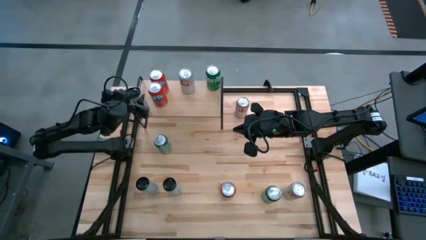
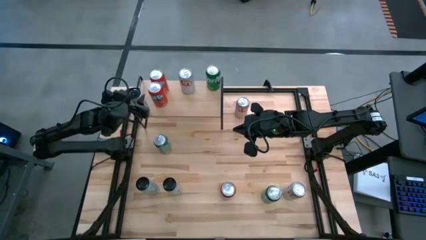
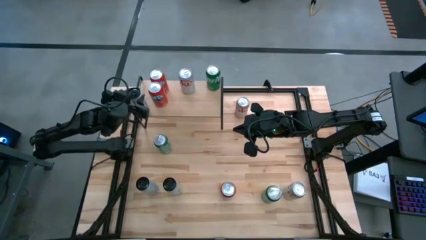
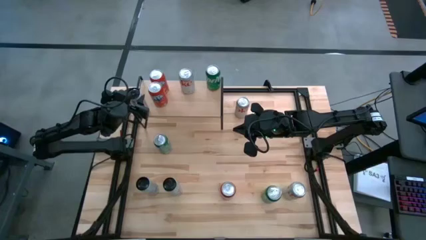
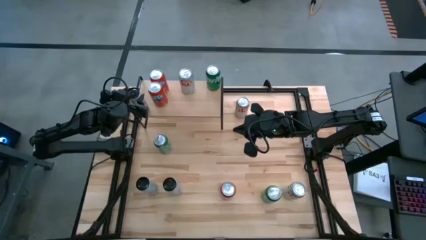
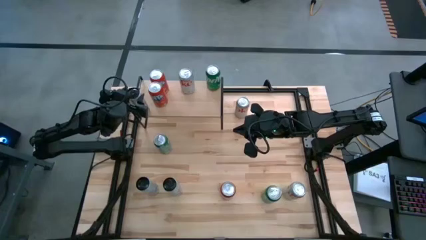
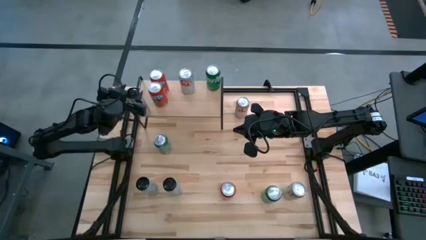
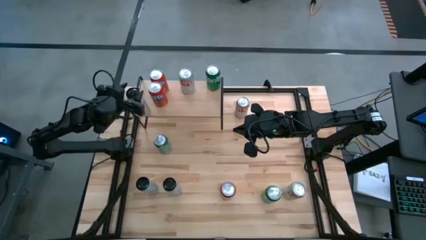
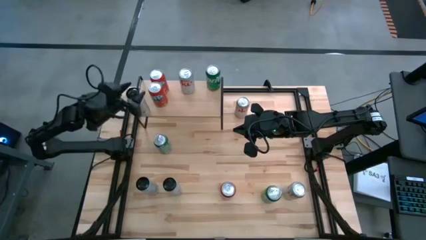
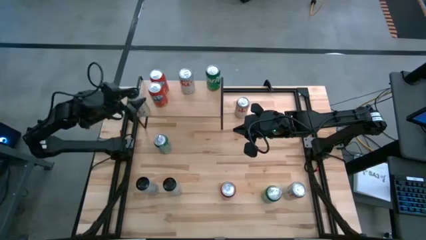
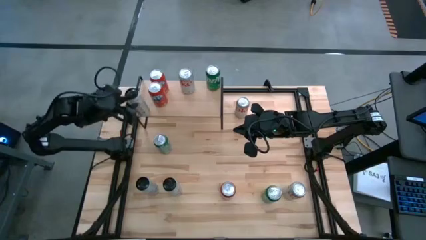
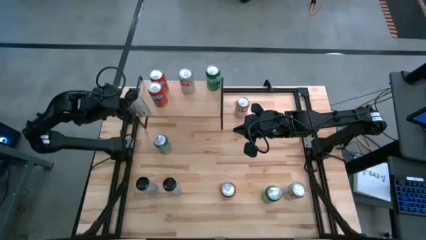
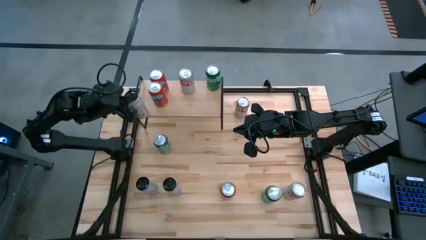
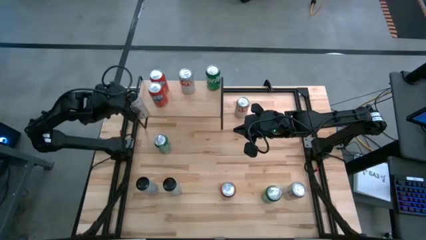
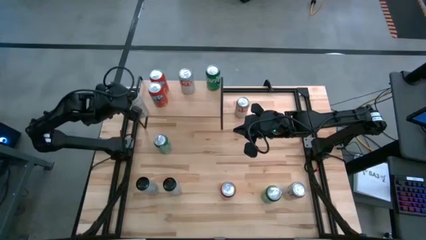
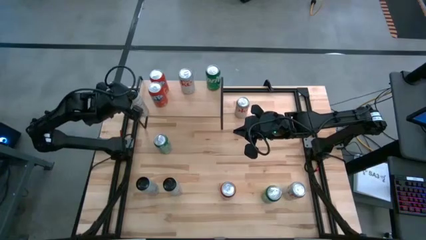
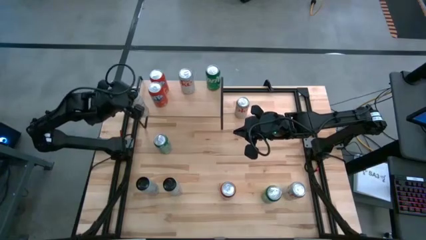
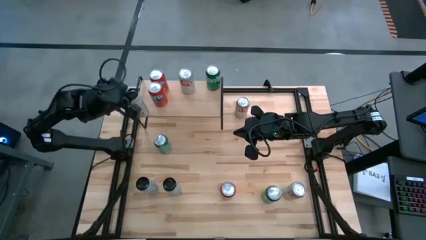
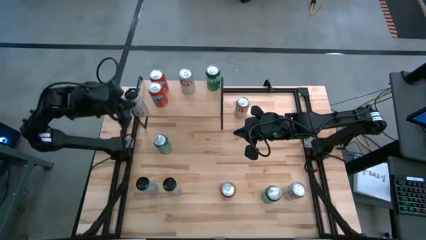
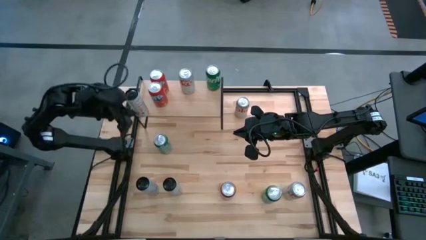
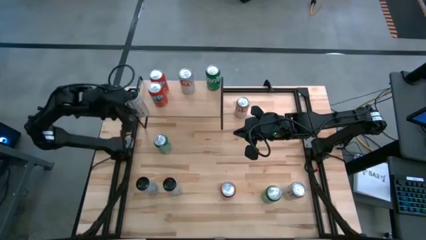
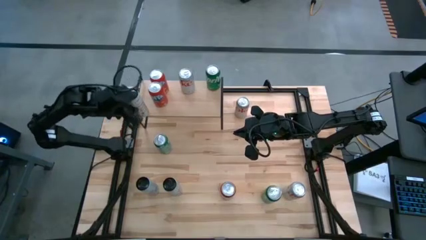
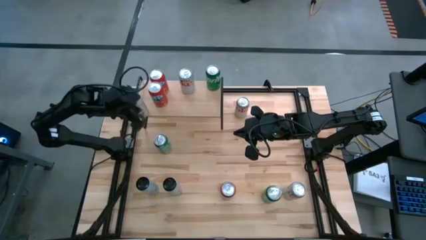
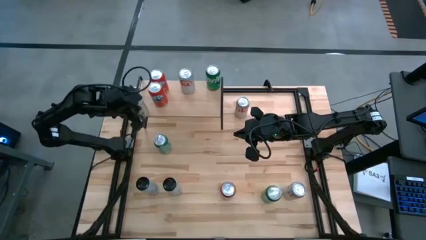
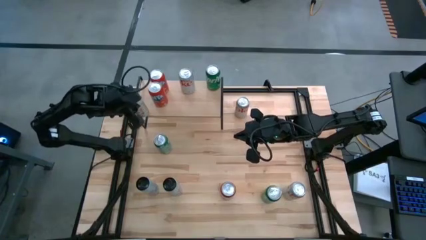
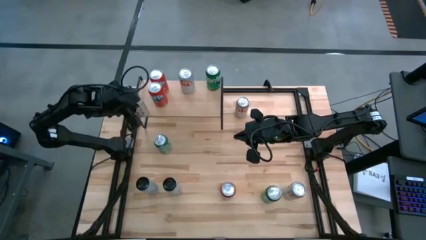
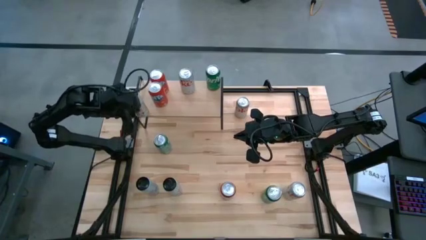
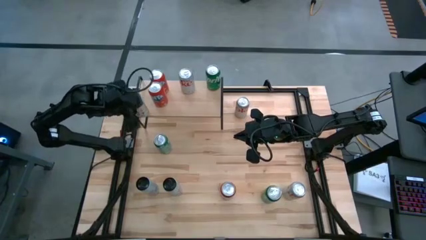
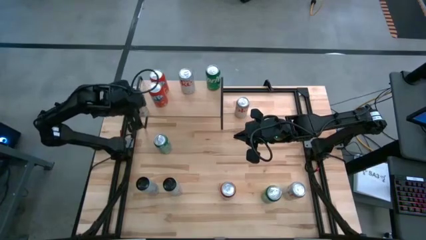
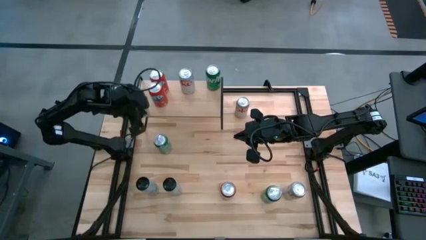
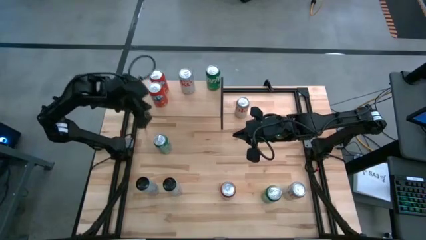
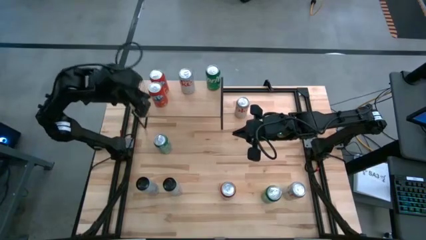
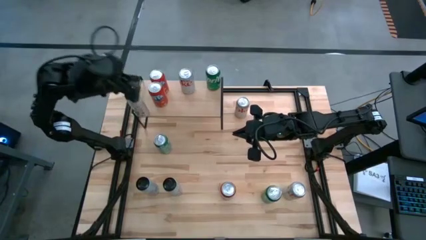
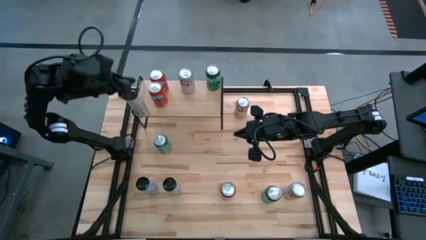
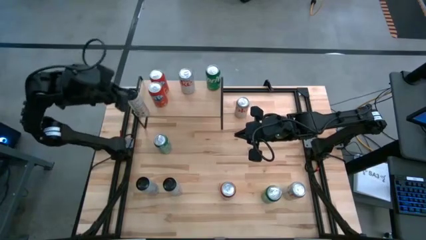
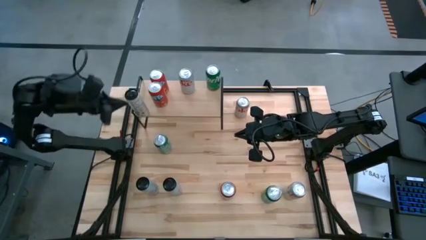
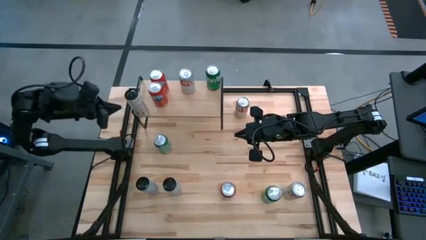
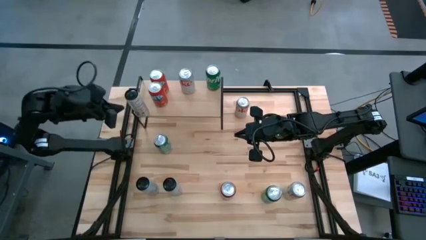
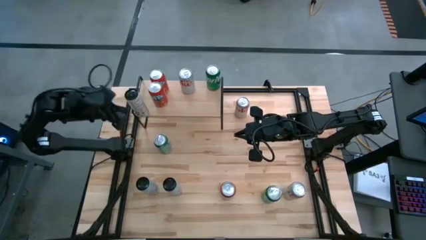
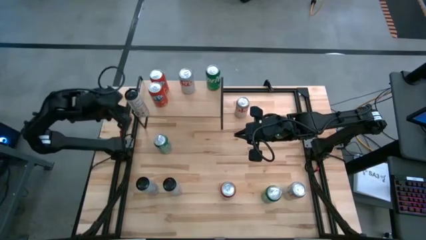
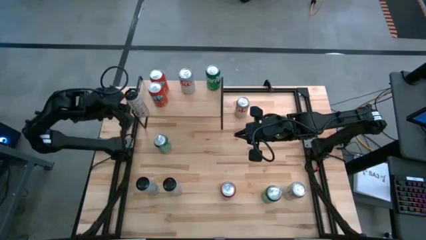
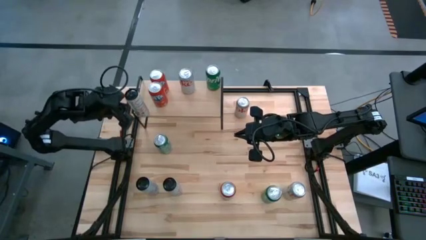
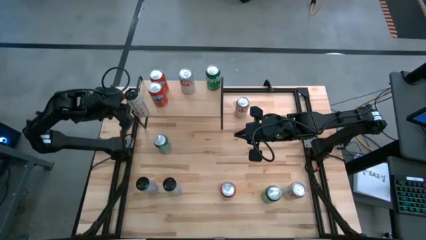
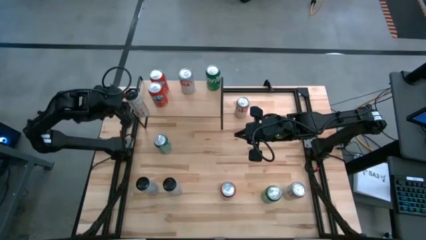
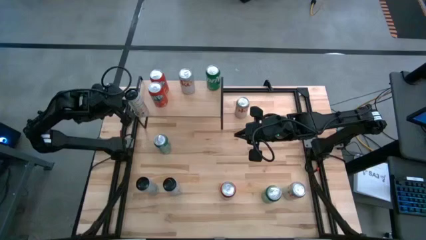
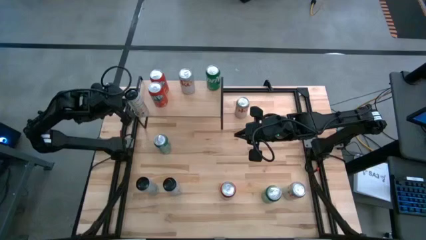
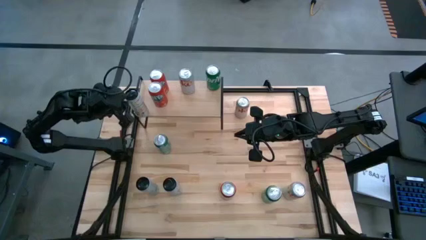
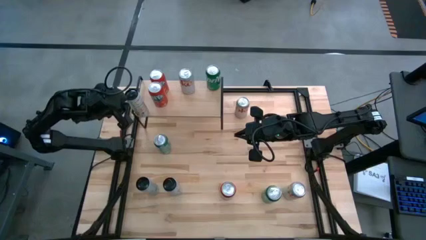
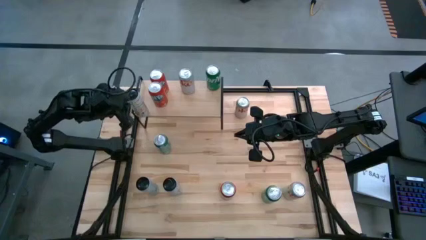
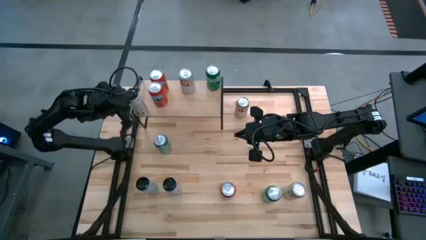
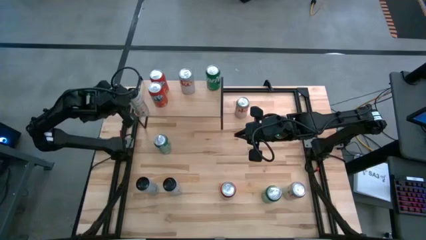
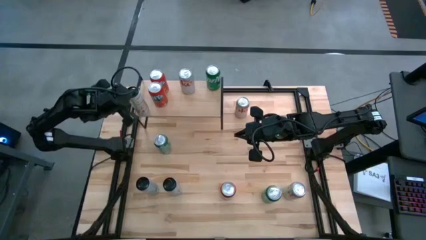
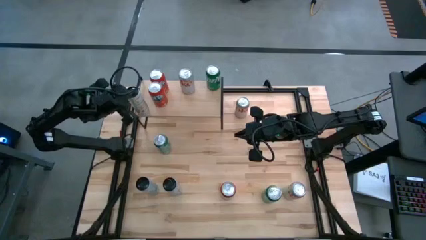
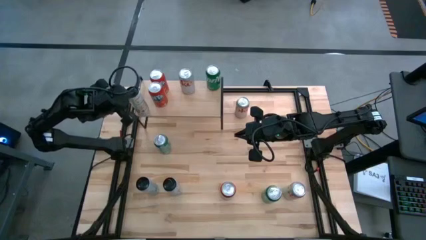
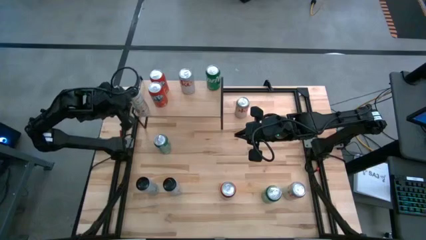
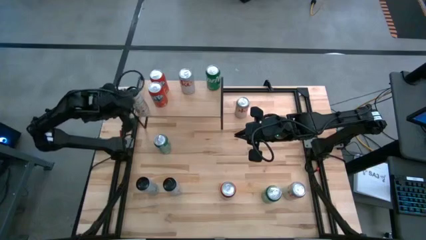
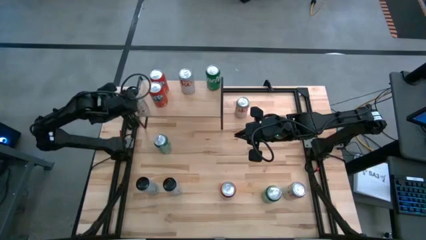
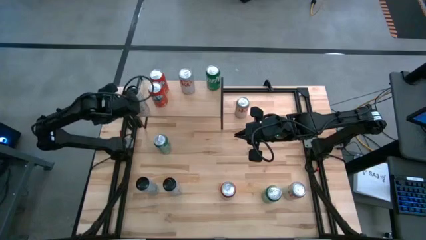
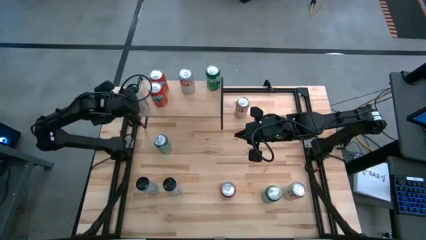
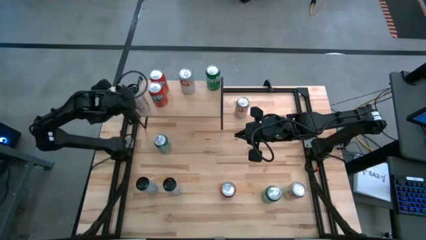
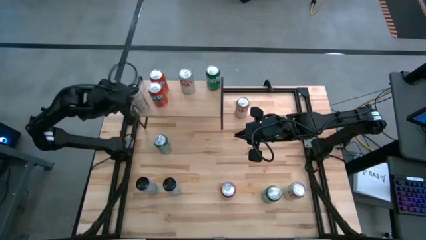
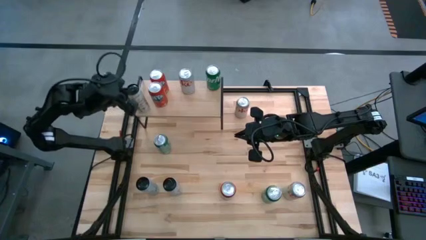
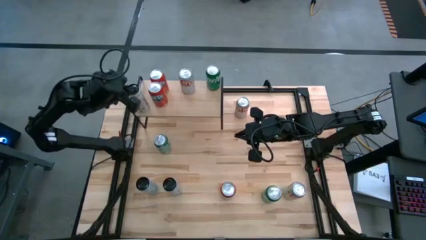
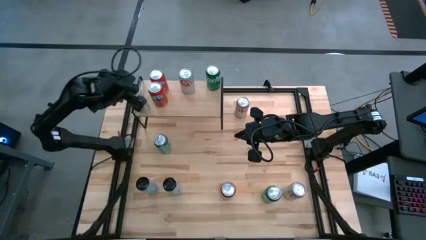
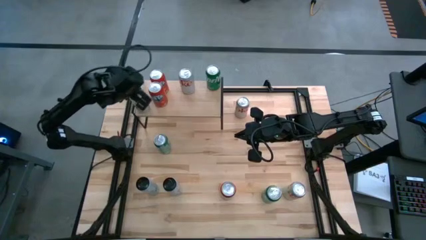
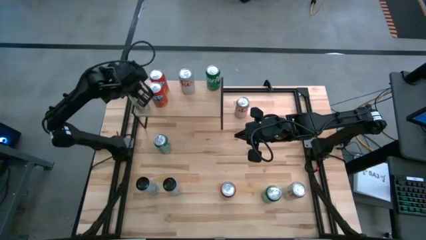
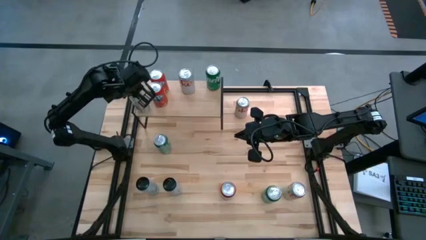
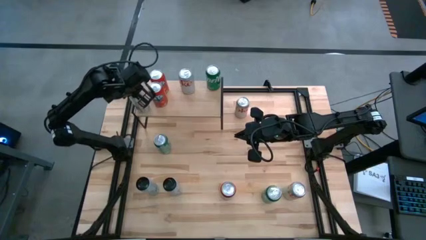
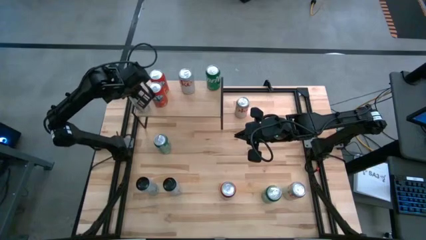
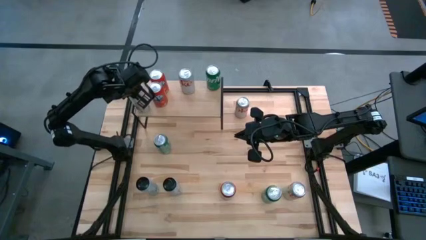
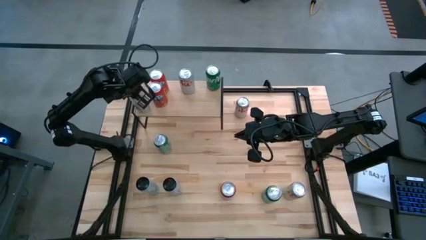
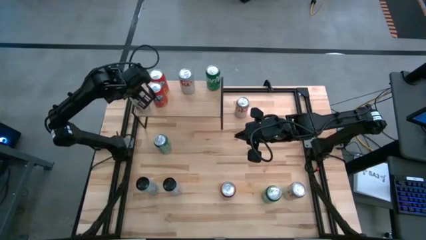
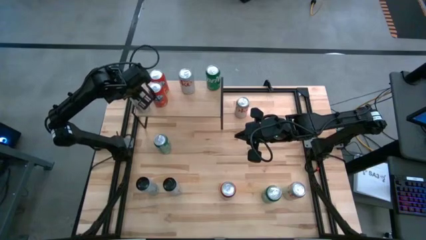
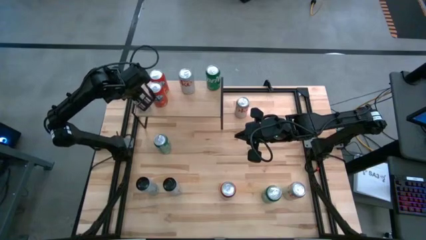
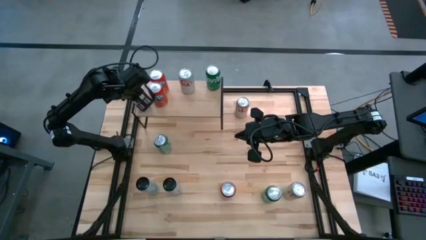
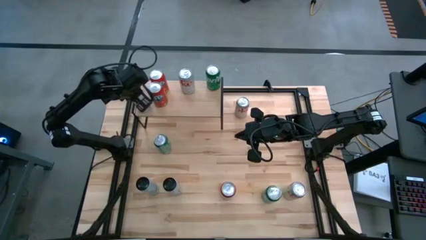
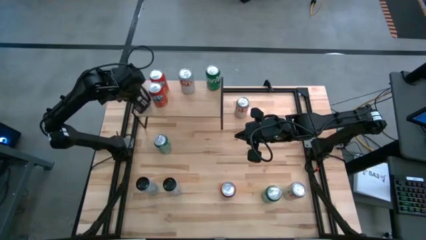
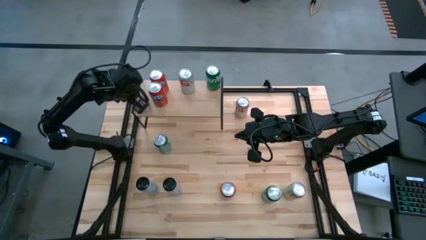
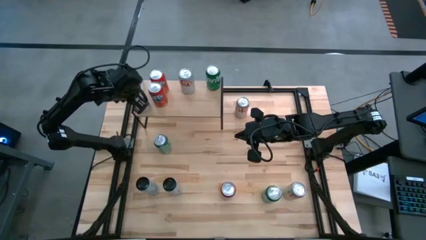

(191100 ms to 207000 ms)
Task: Place canned beverage on shelf
Put the white and yellow soda can on the shelf
